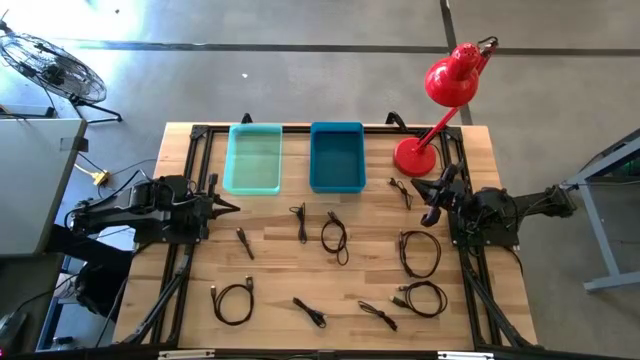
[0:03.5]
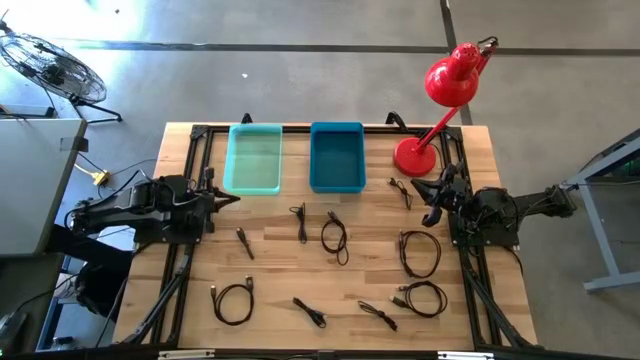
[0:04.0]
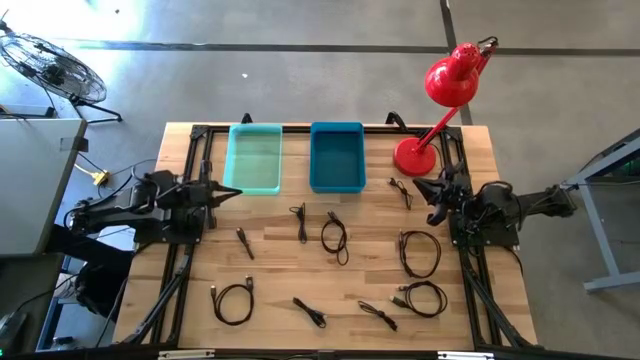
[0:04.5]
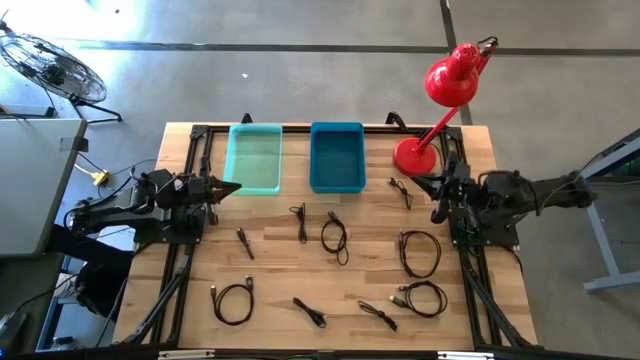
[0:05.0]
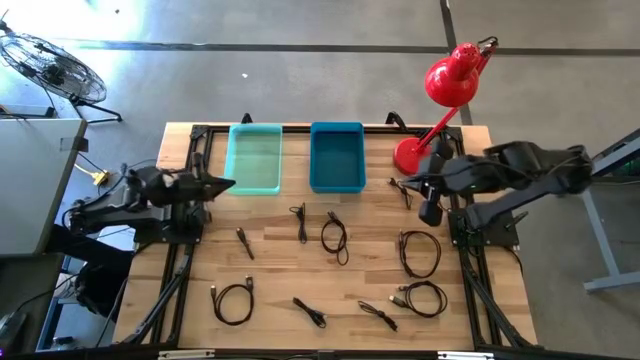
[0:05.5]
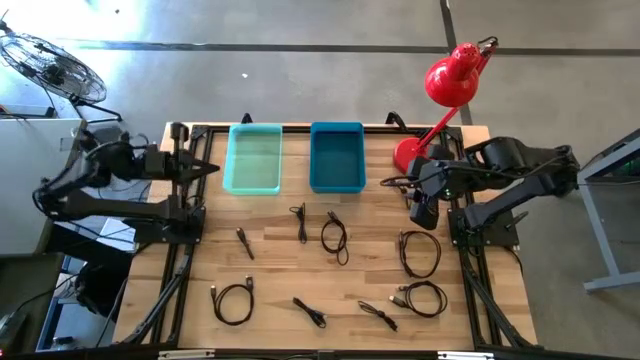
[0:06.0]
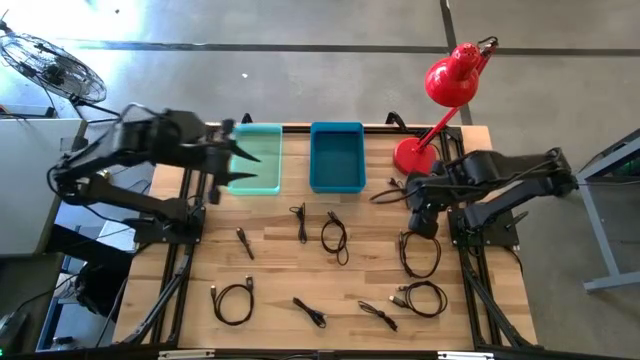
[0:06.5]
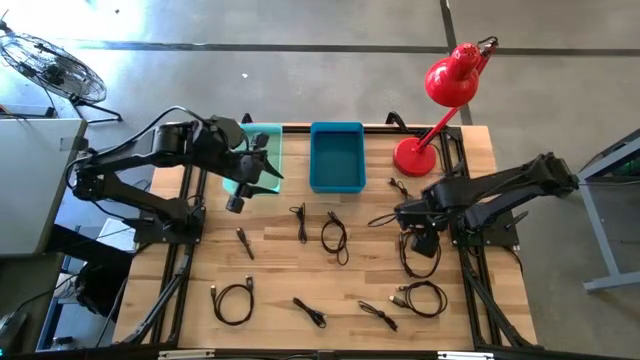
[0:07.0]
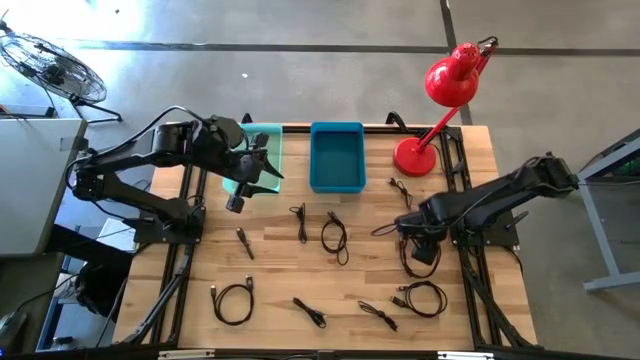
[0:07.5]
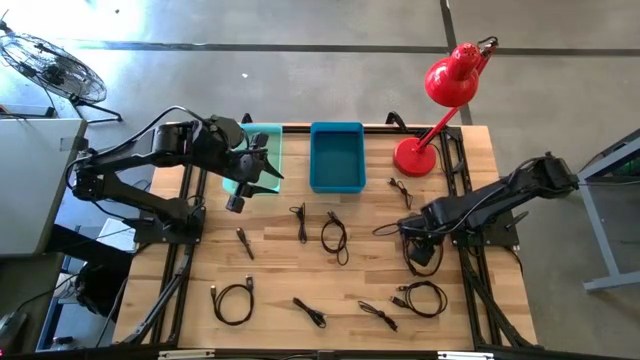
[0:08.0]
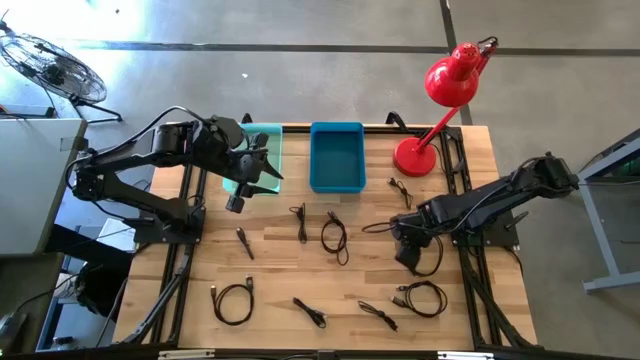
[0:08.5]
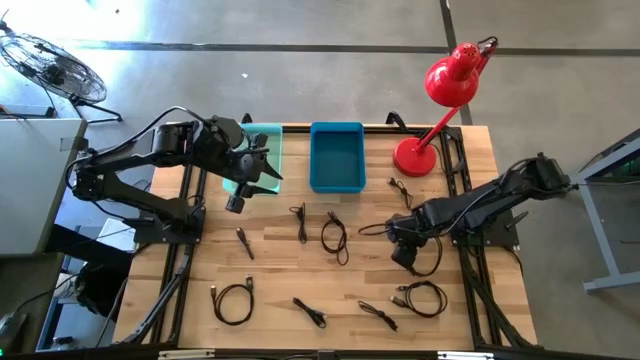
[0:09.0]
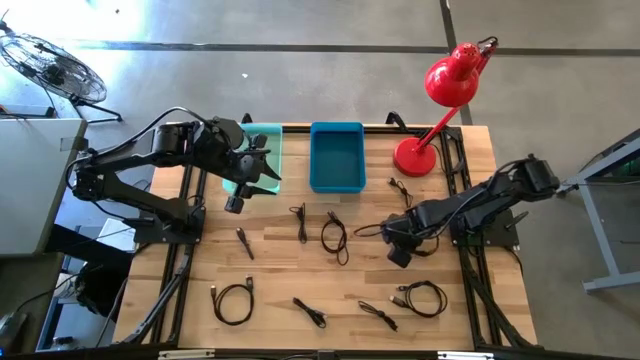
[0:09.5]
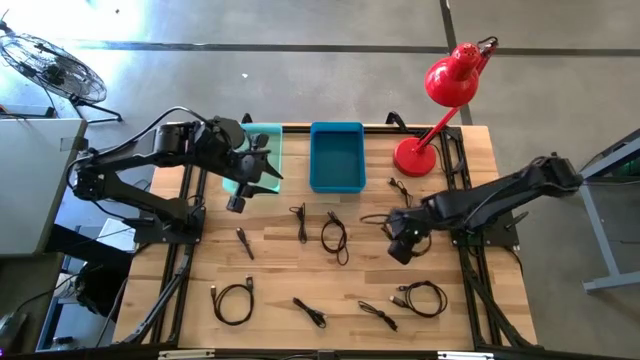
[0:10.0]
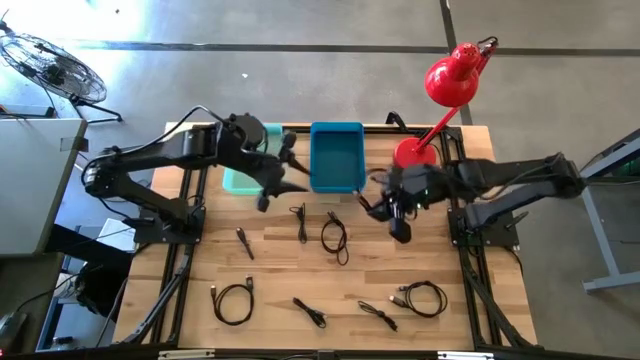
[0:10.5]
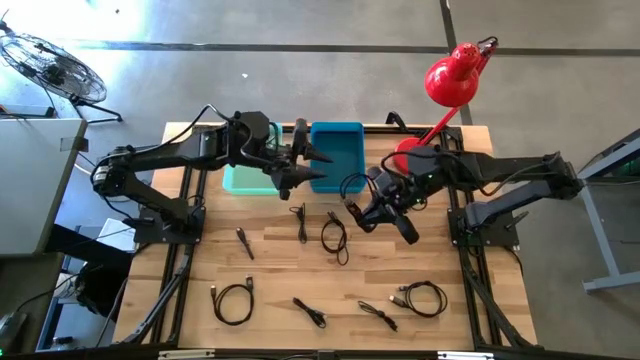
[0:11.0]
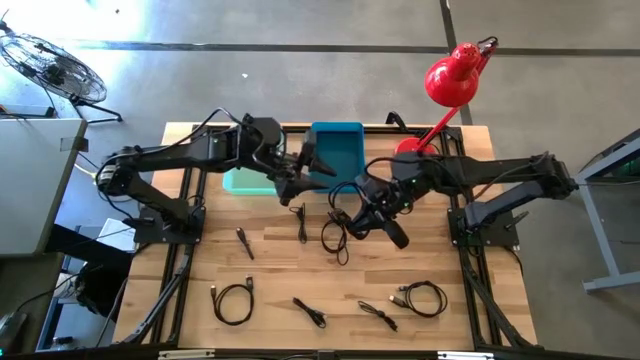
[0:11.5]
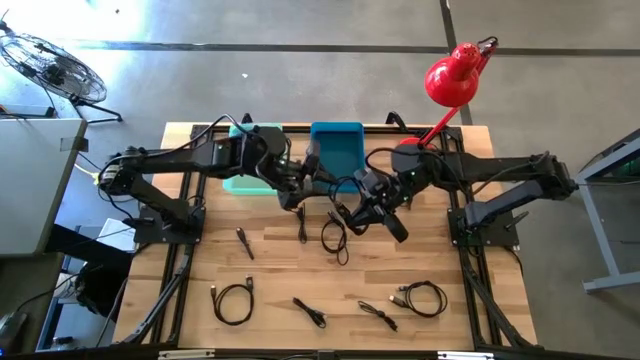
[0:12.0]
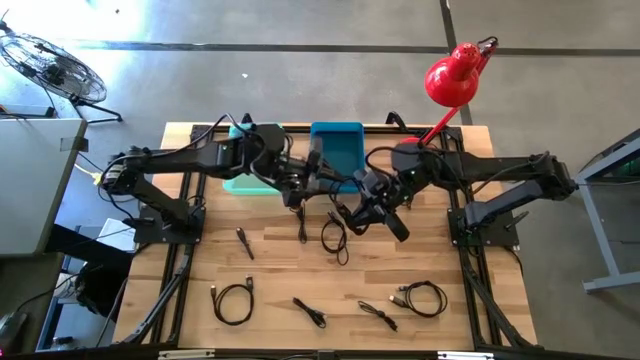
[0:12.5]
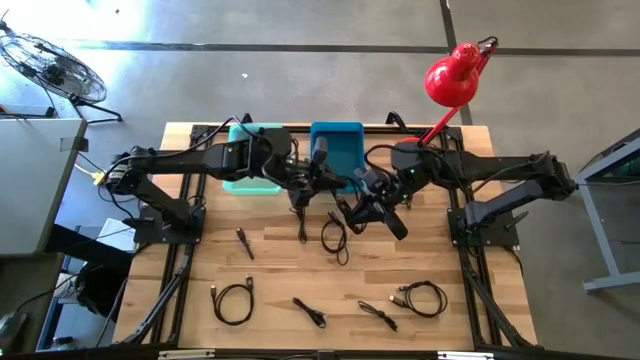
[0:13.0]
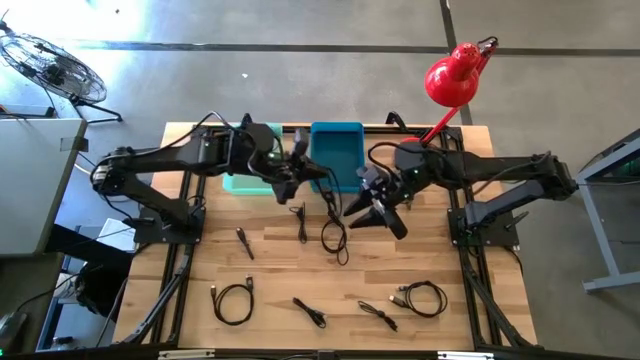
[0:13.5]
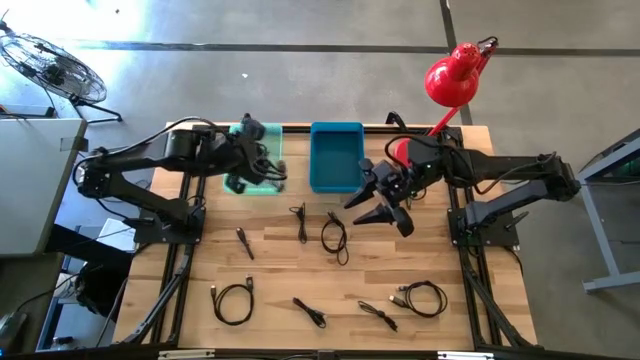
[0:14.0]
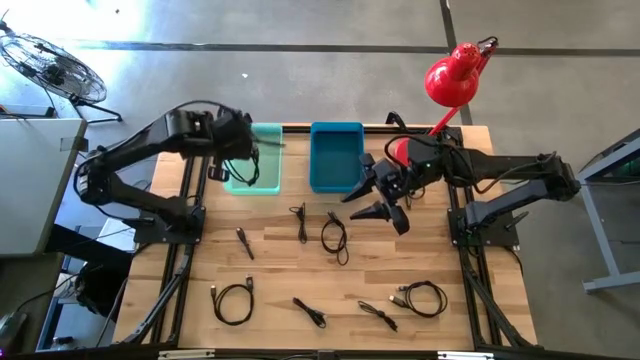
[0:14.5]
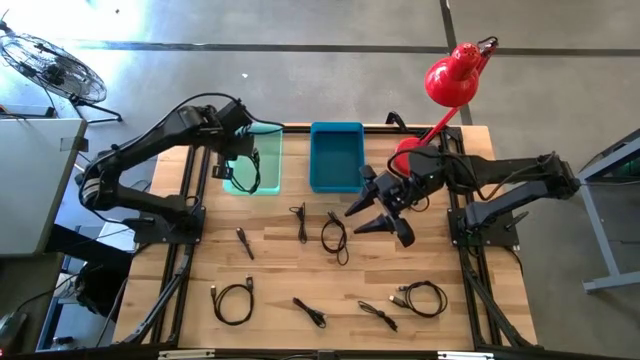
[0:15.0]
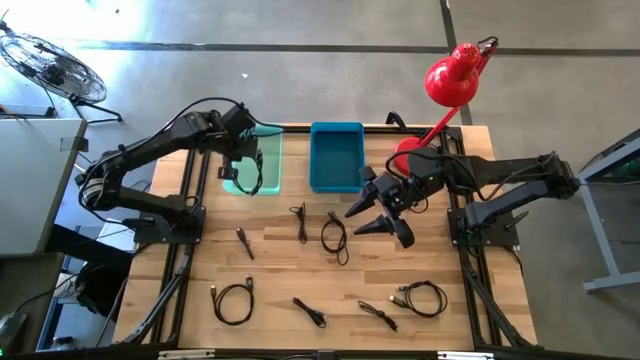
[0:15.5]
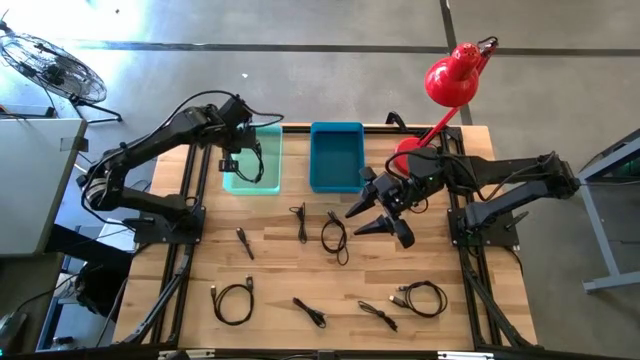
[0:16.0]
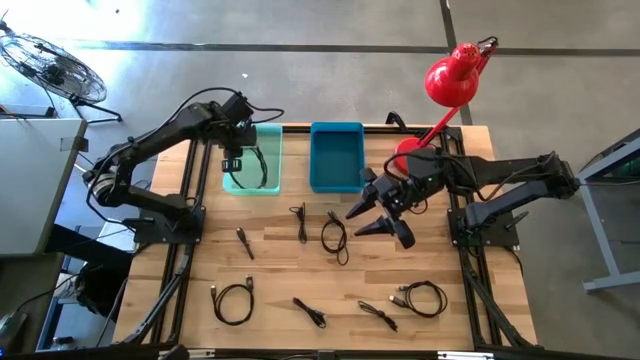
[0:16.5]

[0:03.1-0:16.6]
Task: Pick & Place USB Port
Put the black HDMI cable into the green bin

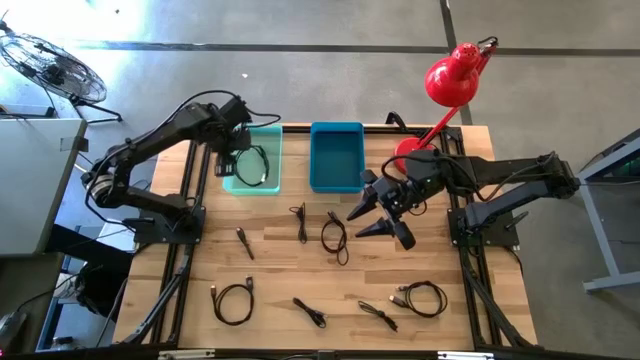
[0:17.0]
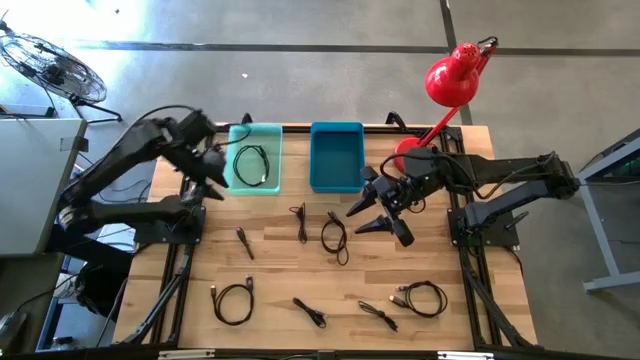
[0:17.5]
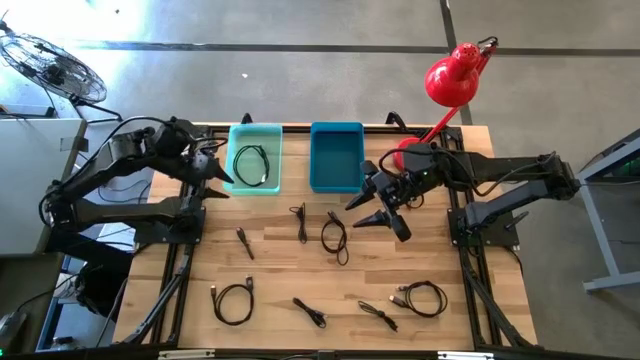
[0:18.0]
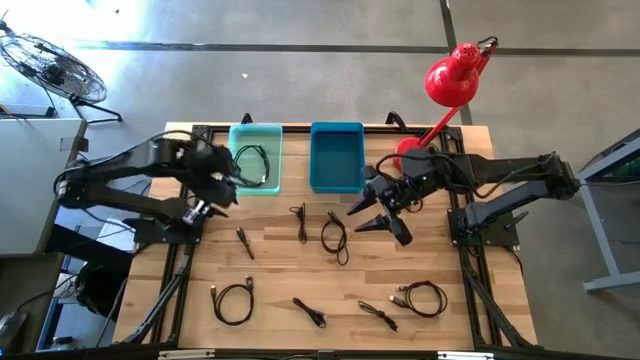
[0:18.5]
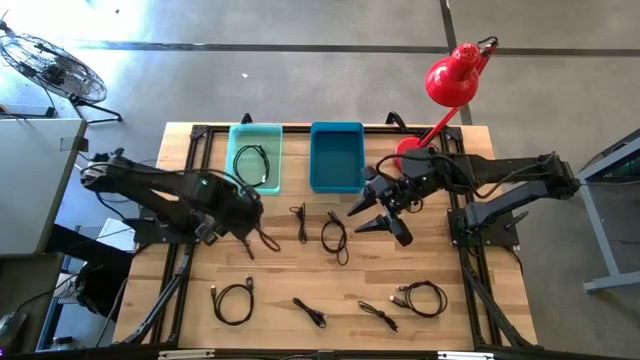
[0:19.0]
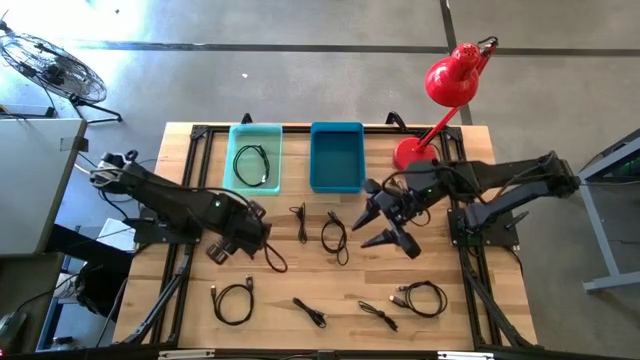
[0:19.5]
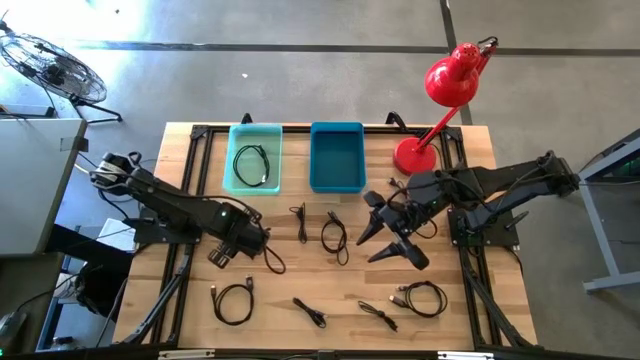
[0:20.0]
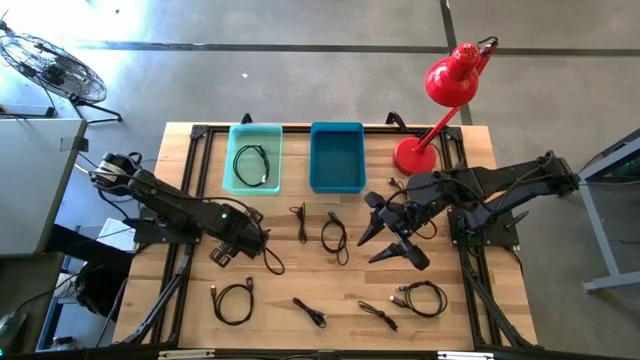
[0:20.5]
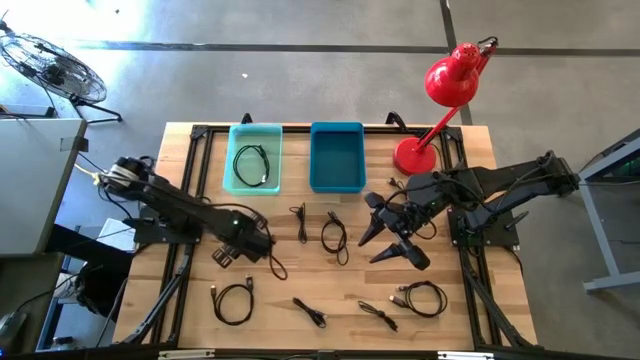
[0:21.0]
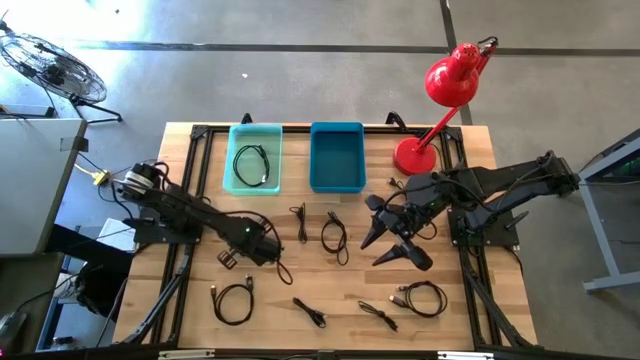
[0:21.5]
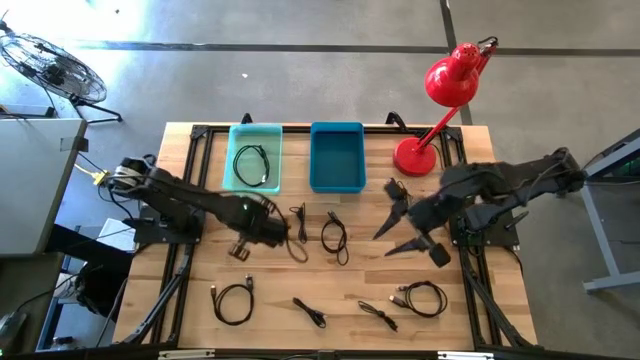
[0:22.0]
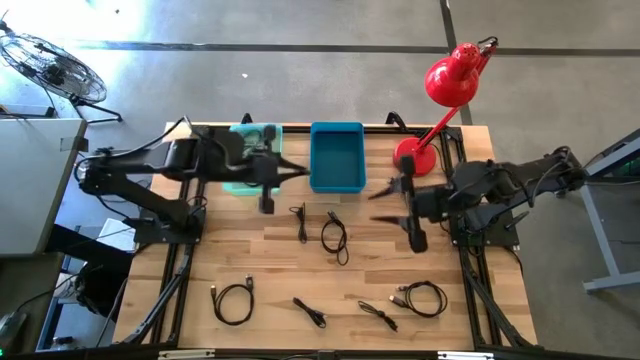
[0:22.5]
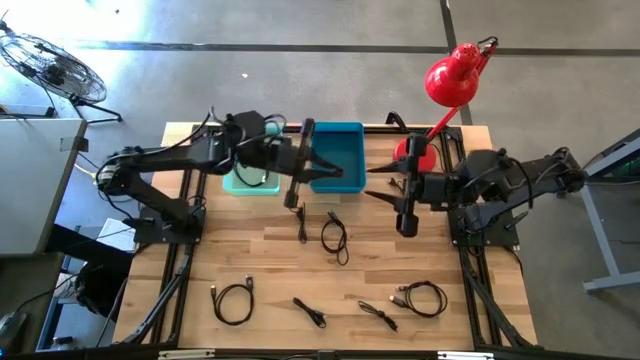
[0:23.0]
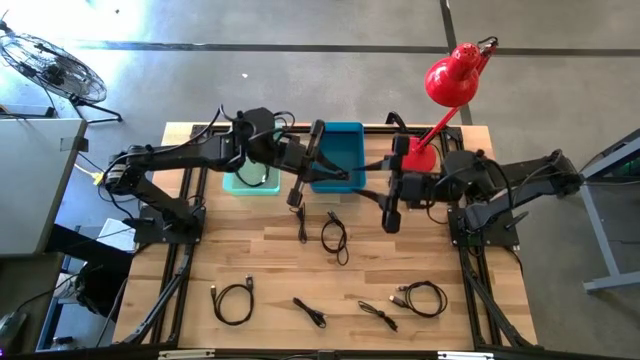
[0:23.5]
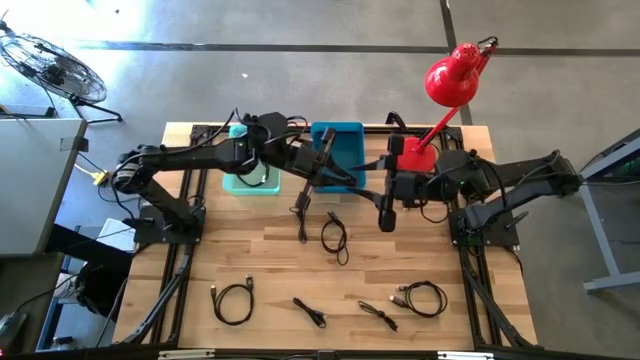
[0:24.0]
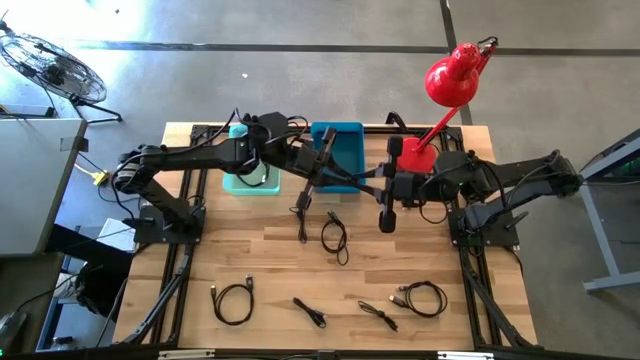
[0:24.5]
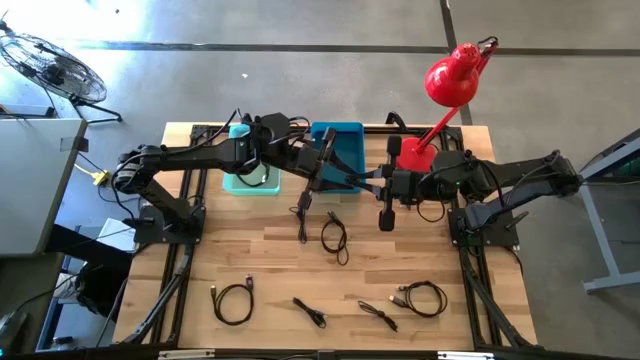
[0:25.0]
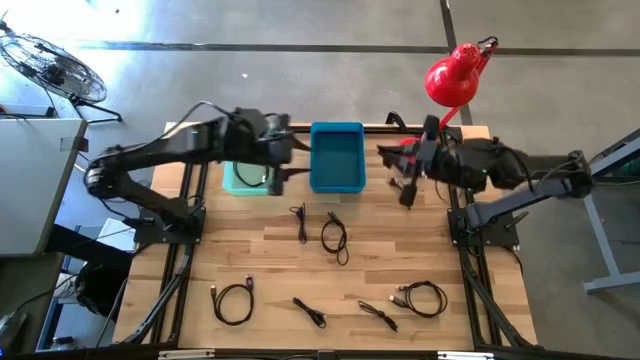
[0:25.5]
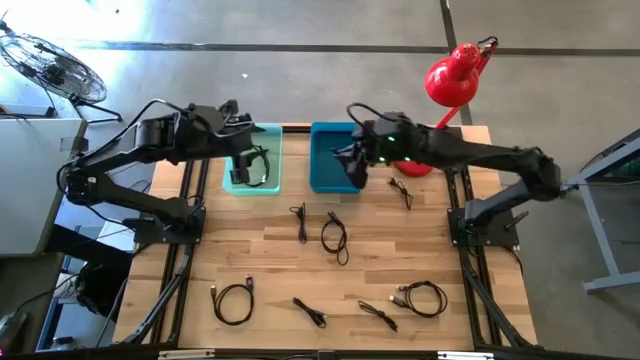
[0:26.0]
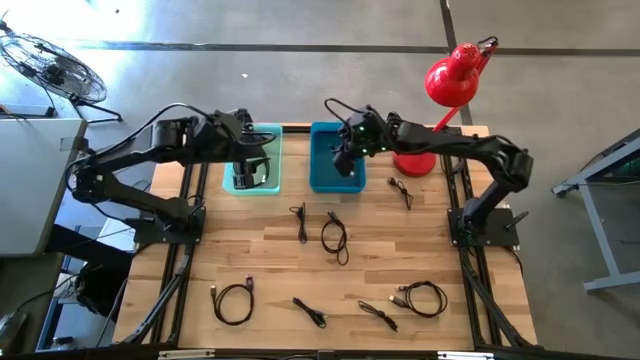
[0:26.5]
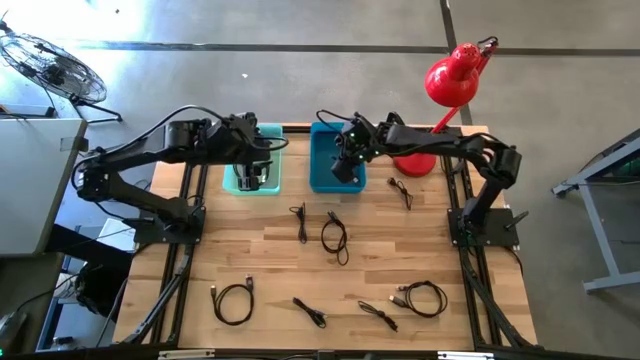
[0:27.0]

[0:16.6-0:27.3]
Put the black USB cable into the blue bin
